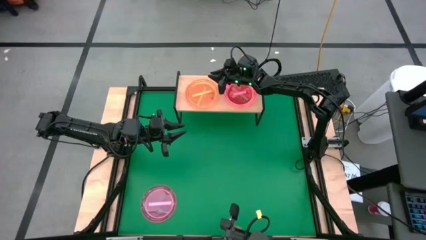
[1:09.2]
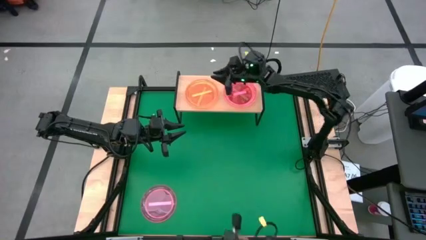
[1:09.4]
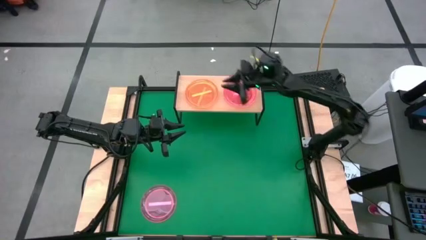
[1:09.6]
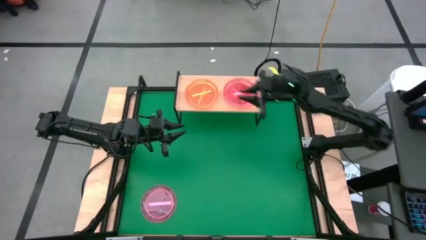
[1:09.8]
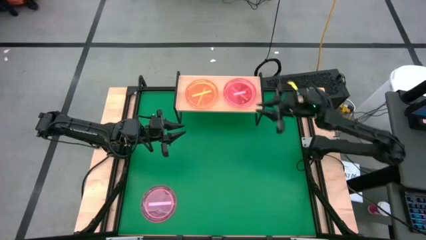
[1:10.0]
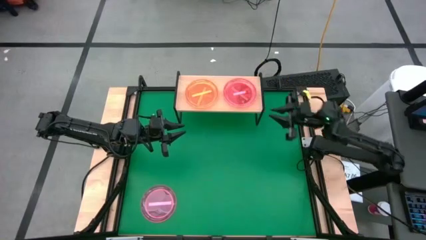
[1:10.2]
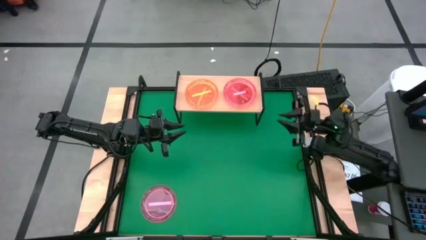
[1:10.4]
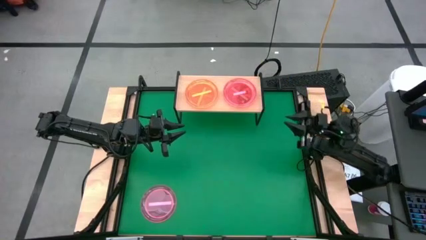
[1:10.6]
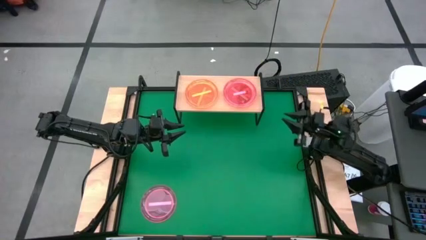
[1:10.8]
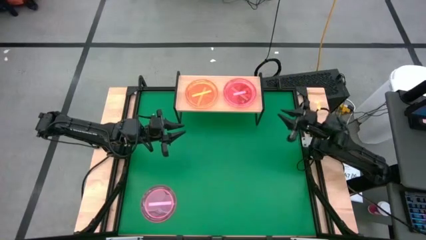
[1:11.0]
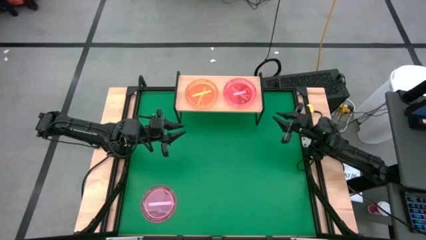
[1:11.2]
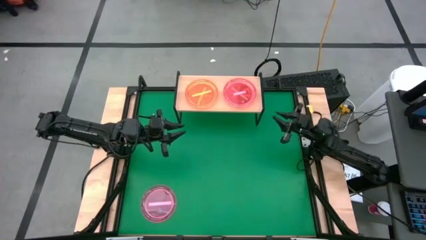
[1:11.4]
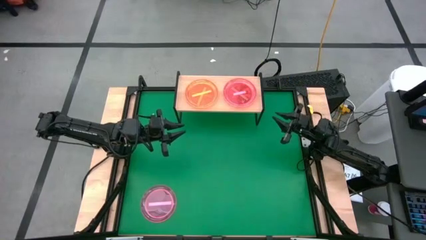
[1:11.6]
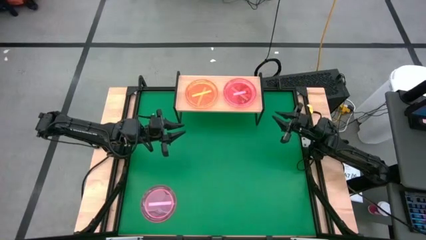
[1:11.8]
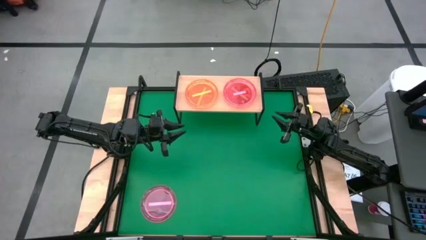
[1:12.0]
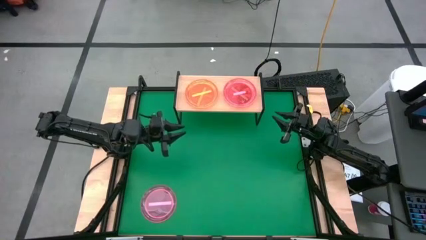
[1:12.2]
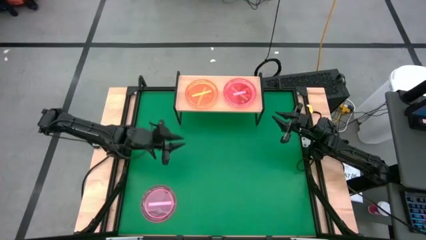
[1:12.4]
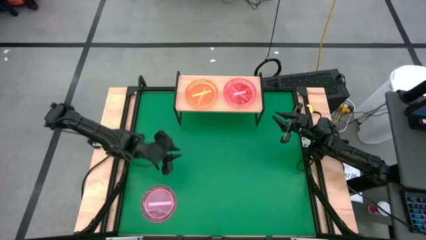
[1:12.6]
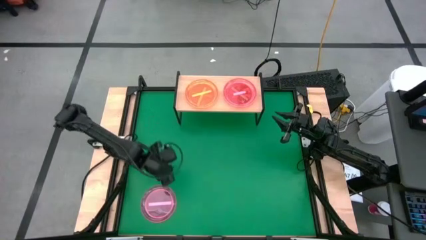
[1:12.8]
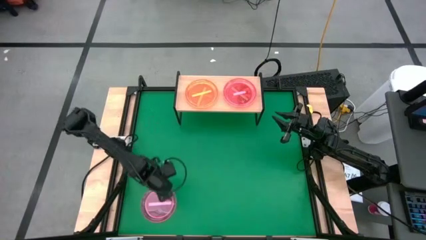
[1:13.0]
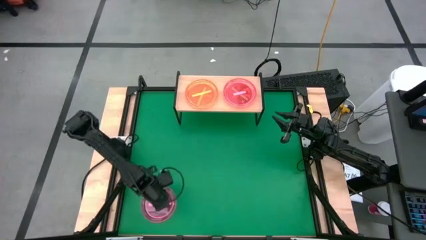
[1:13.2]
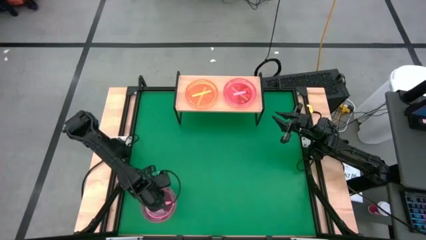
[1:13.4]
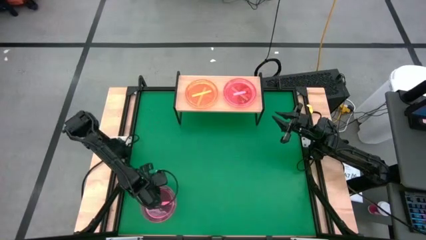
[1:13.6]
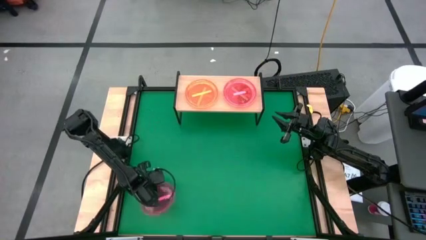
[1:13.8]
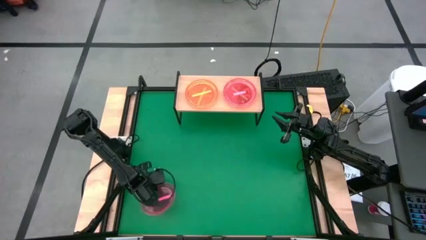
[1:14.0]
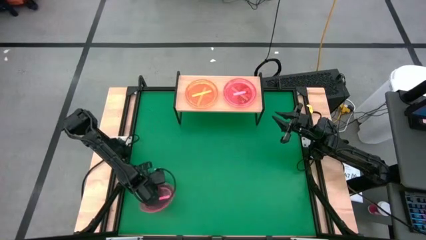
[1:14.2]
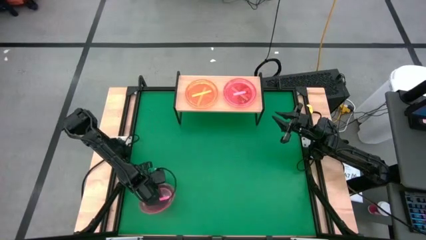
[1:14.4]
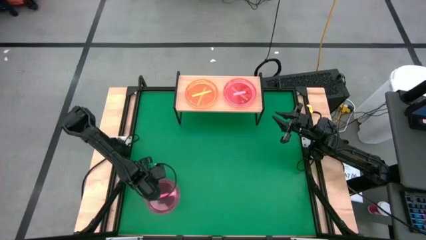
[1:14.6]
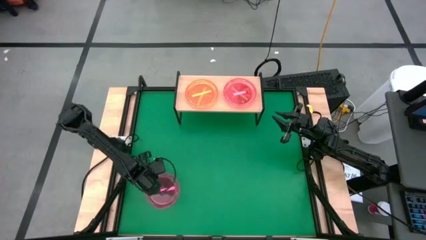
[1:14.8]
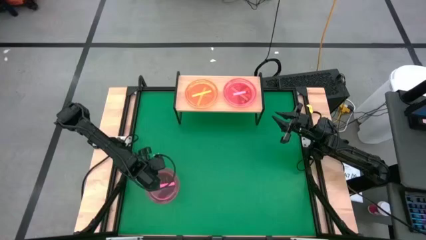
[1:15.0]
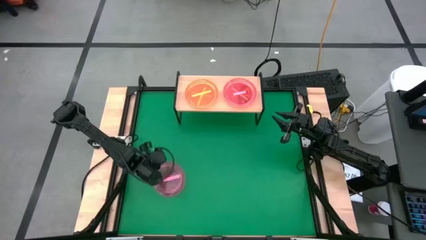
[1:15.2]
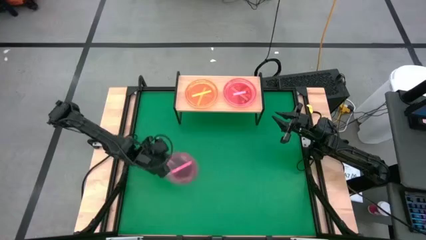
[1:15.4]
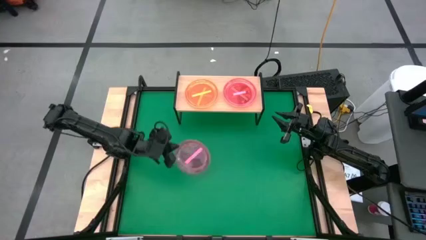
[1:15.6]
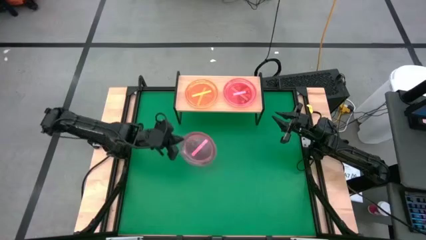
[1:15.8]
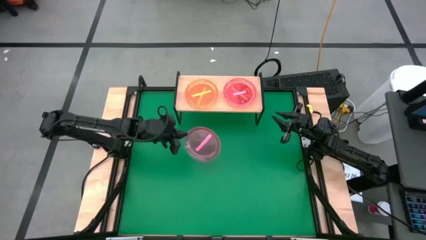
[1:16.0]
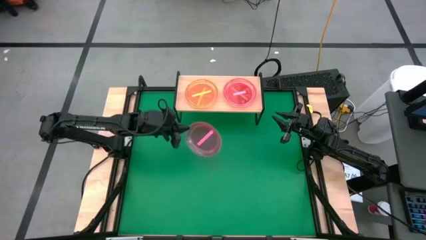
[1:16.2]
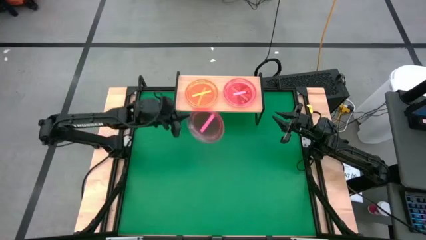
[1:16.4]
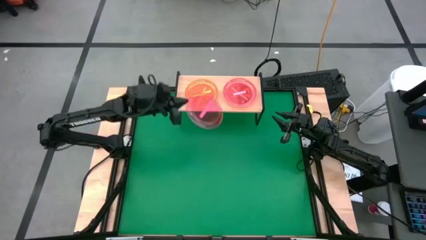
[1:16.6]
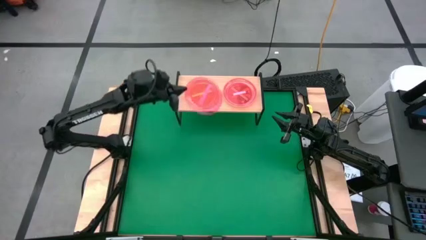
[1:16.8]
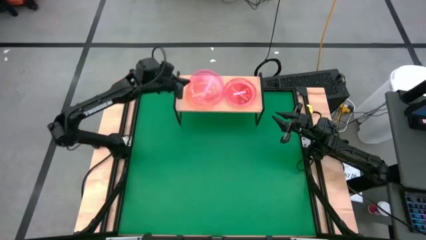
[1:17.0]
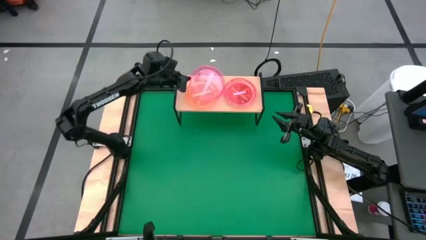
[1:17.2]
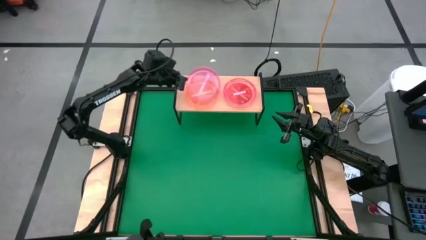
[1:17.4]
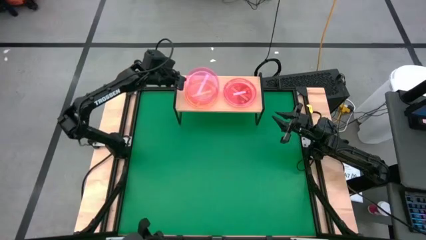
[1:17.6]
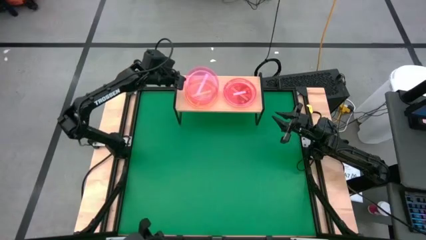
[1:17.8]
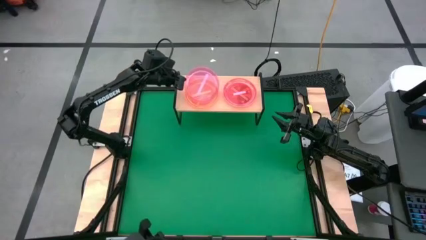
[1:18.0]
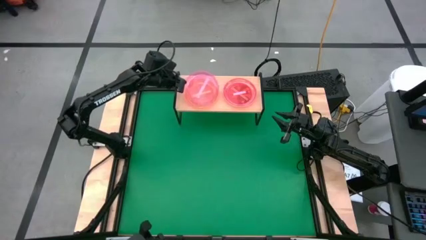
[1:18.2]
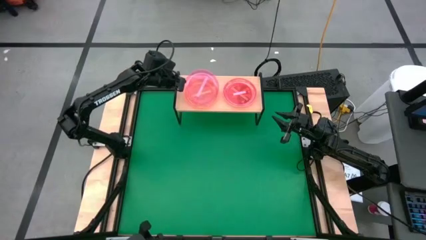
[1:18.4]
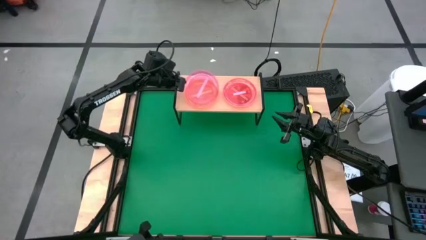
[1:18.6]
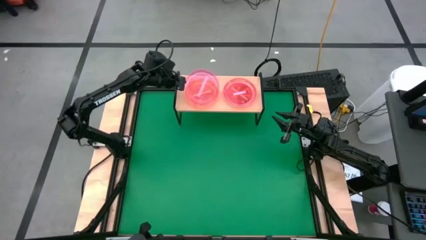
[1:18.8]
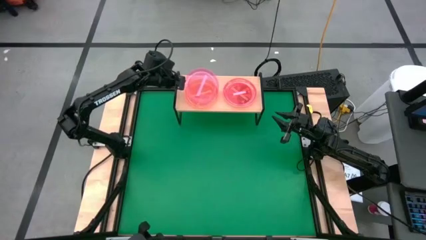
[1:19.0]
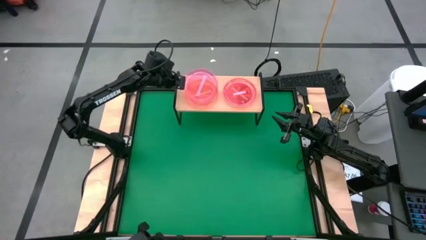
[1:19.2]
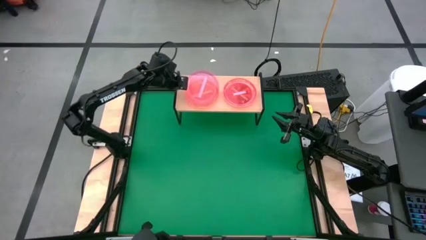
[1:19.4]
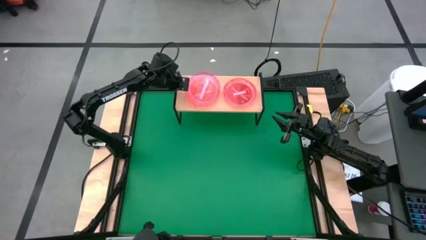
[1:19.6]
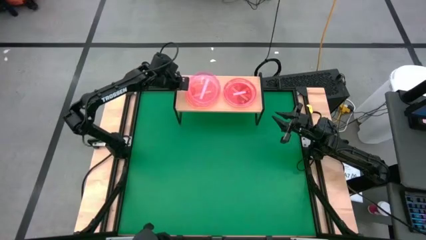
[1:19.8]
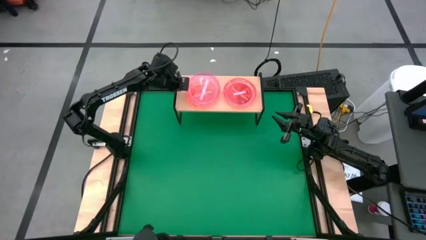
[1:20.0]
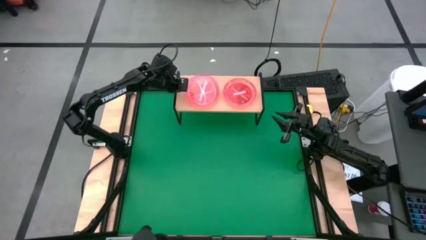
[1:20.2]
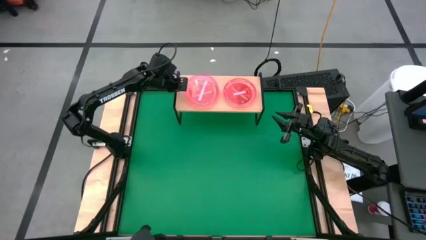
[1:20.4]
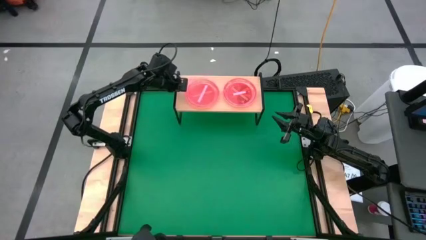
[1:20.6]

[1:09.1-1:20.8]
Task: Place and stack plates onto a shelf
Stack the pink plate on top of the orange plates on the shelf
